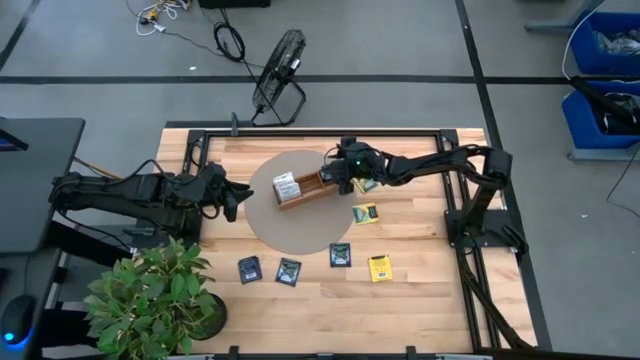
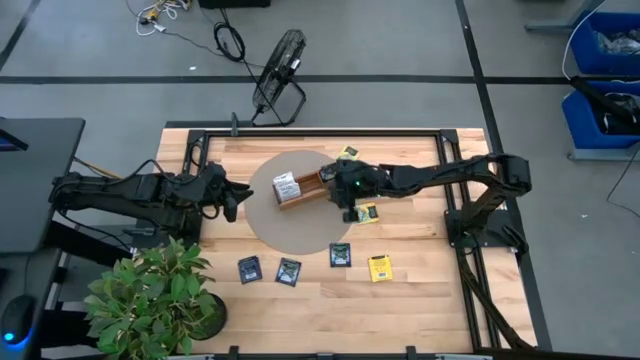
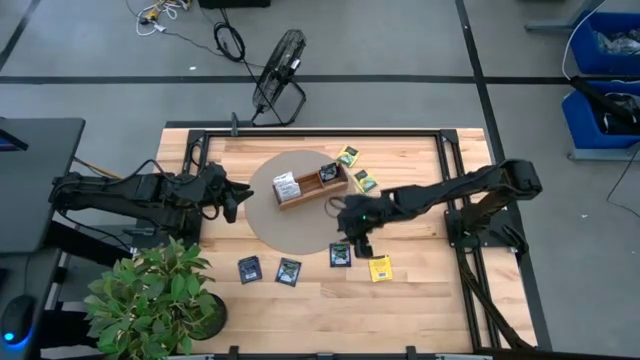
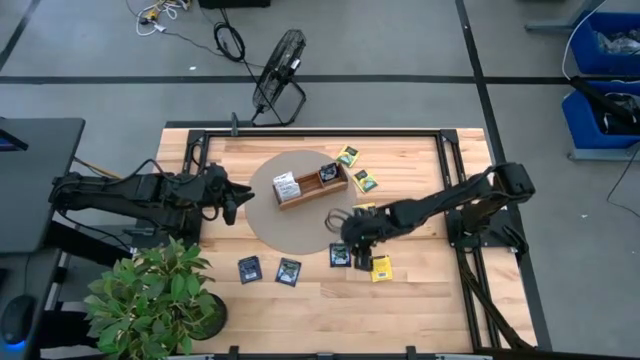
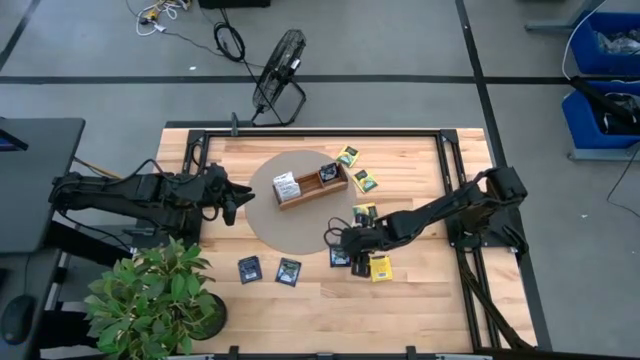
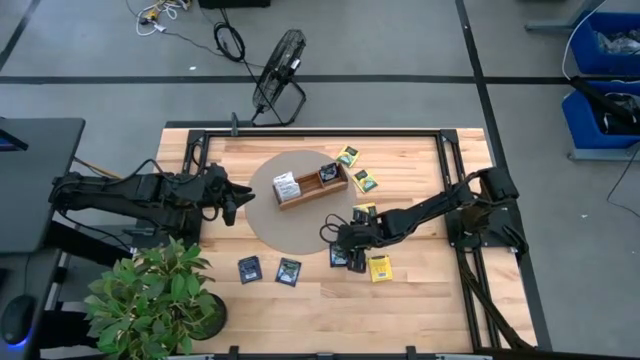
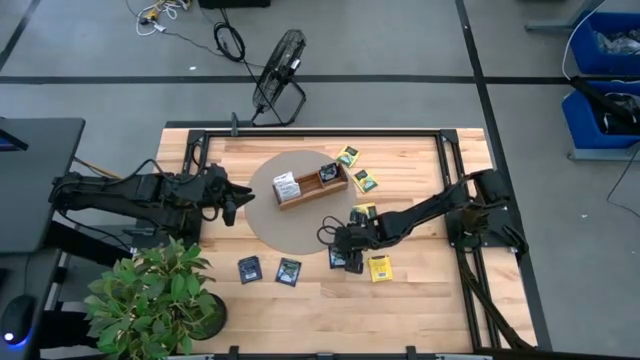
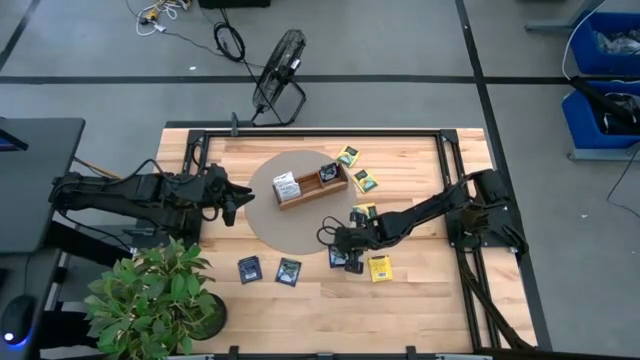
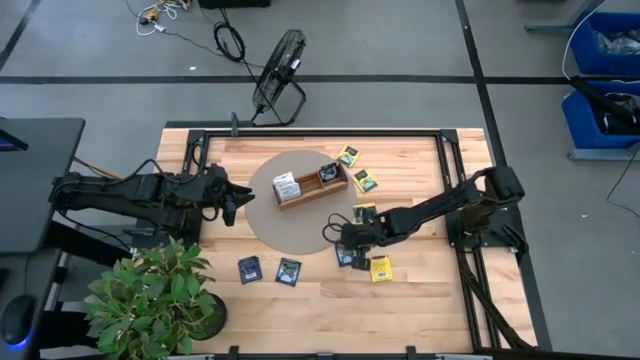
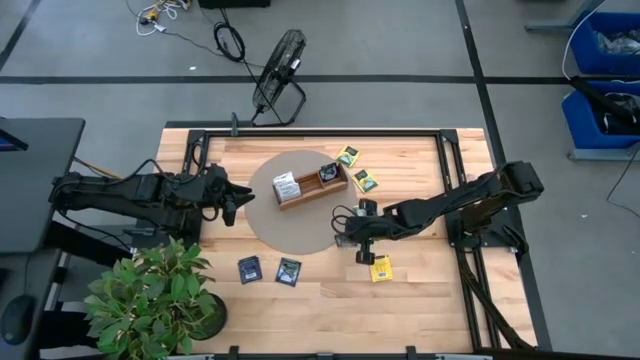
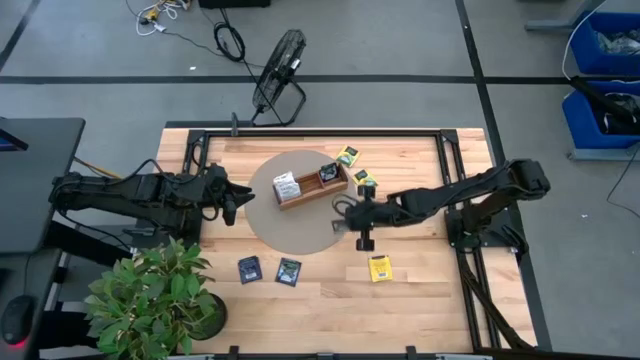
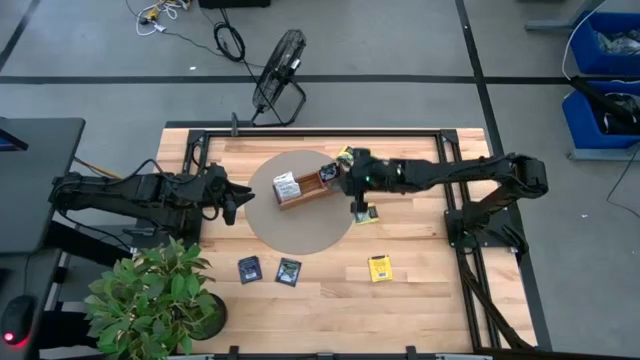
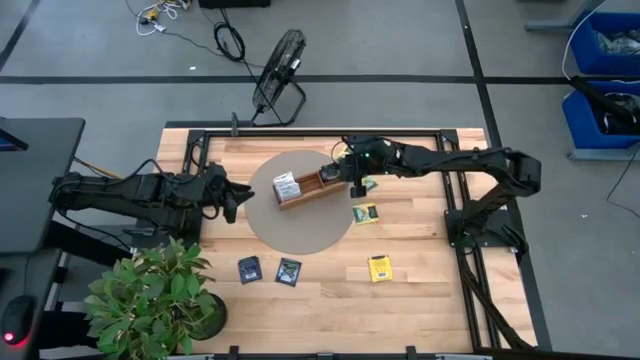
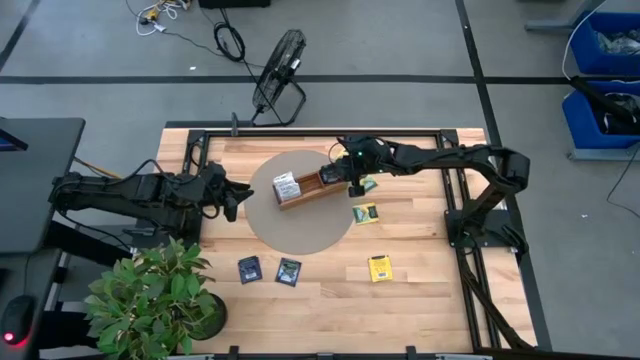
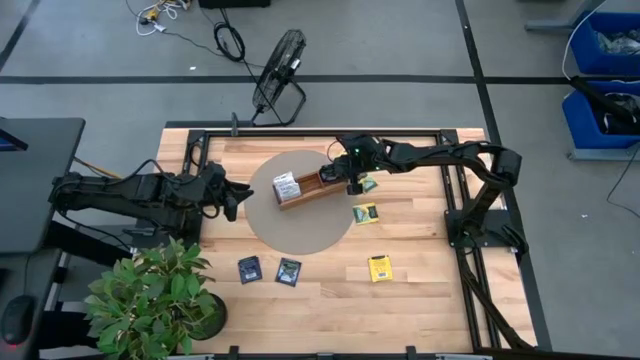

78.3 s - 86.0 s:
Task: Pick & Place Tea
Put the purple tea bag into the right section of the wooden organizer

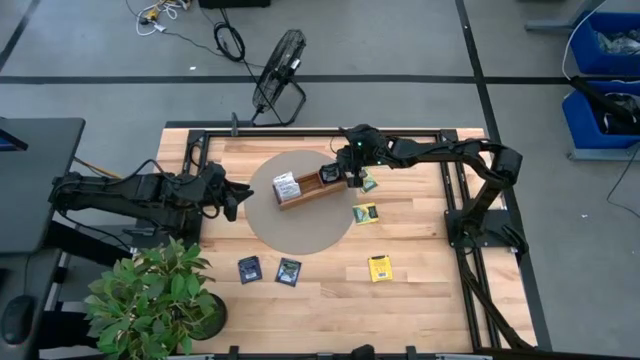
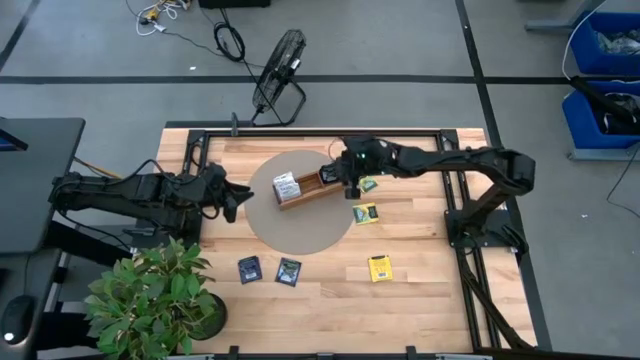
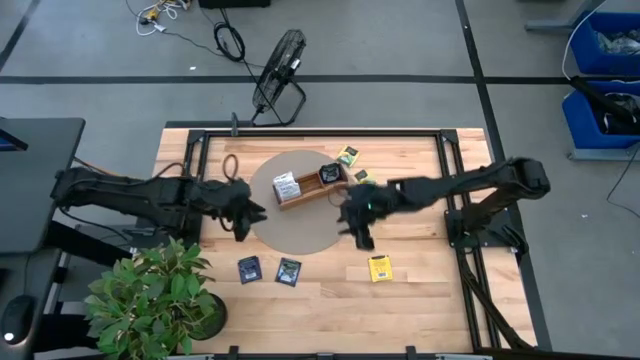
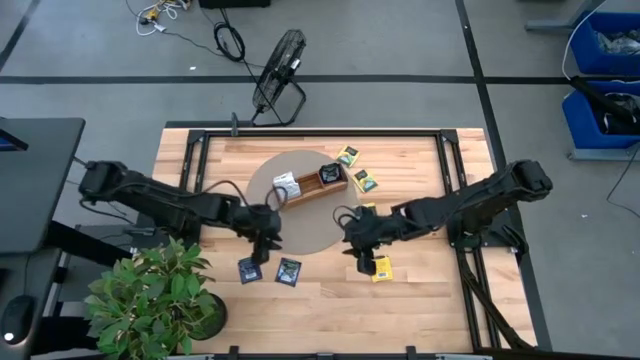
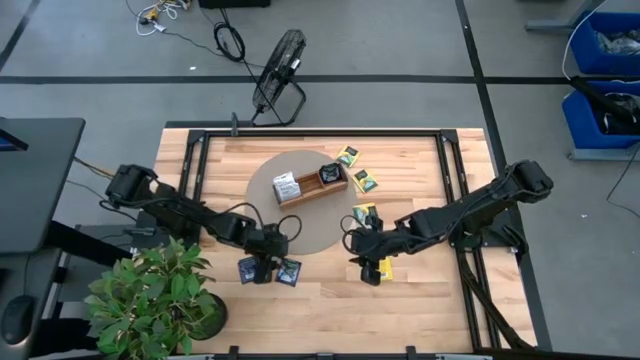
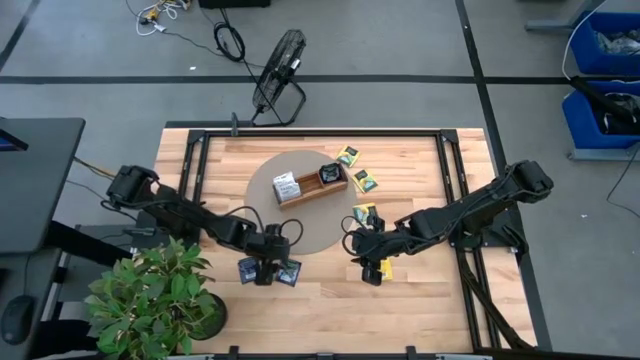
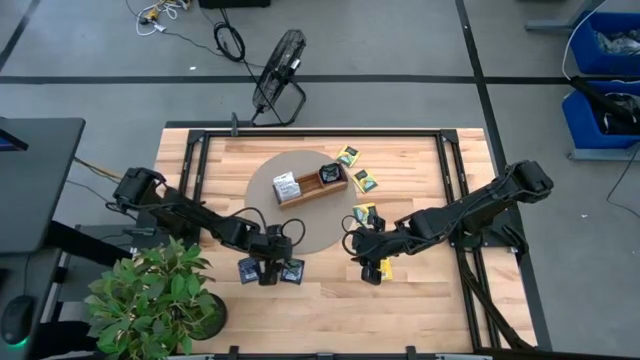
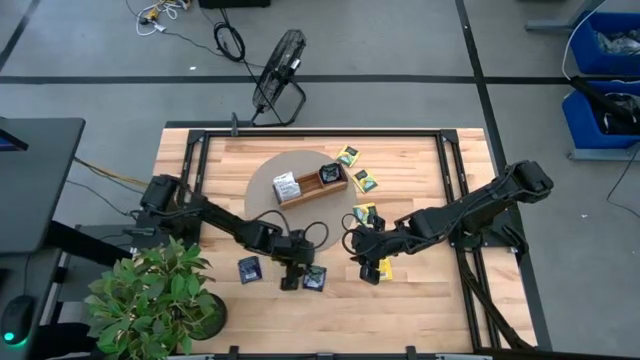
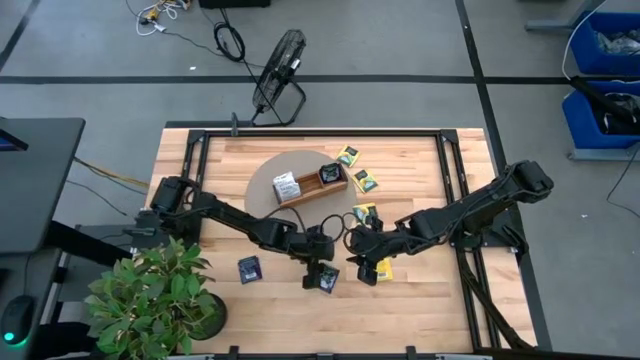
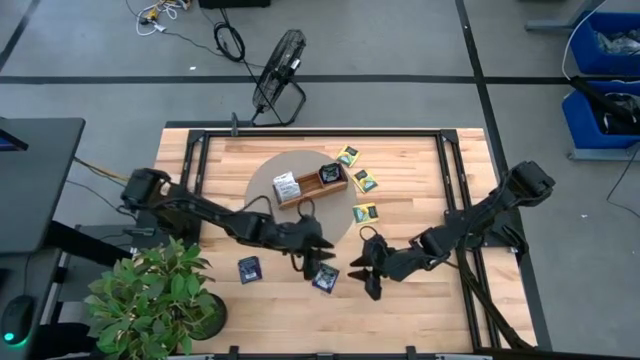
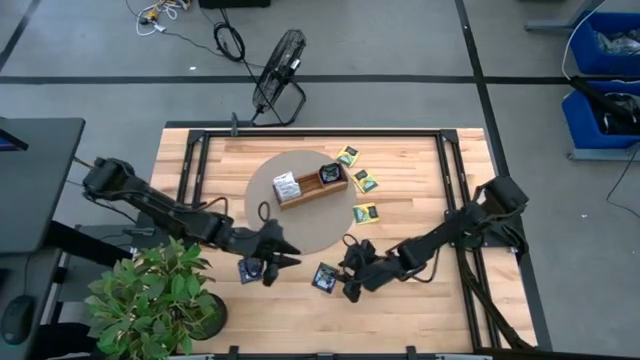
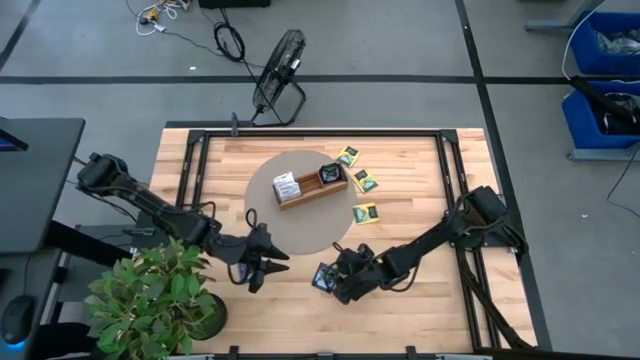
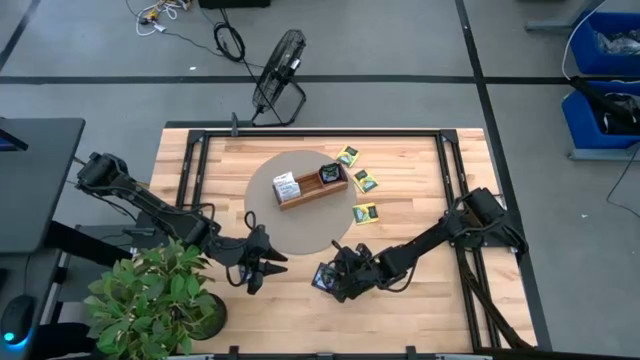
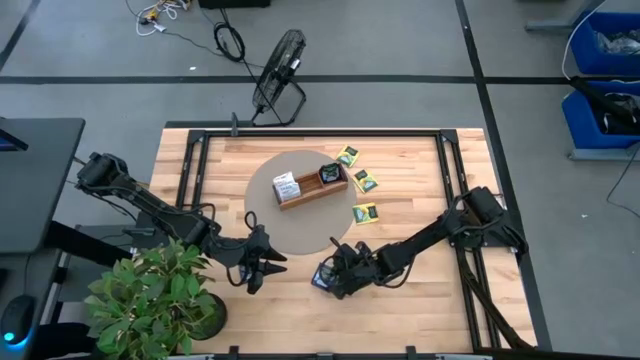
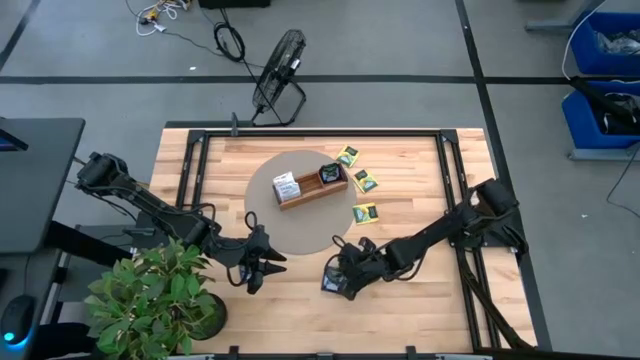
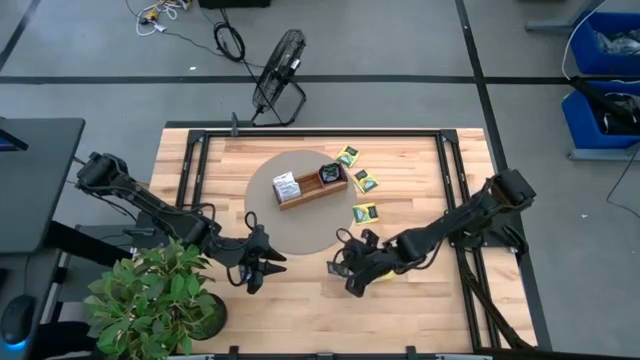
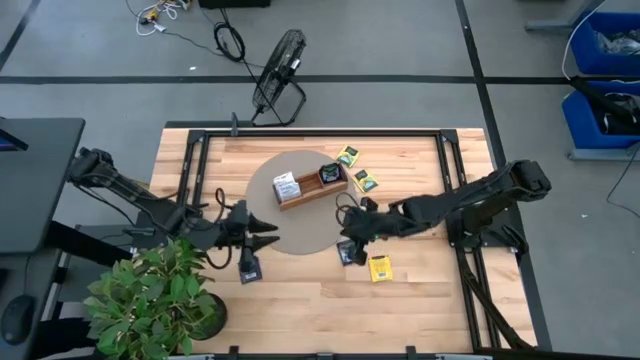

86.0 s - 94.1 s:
Put the purple tea bag into the right section of the wooden organizer

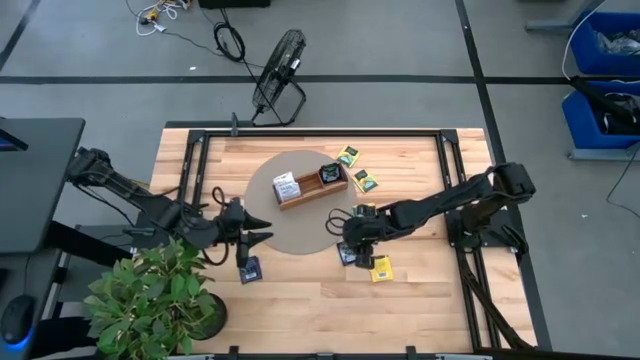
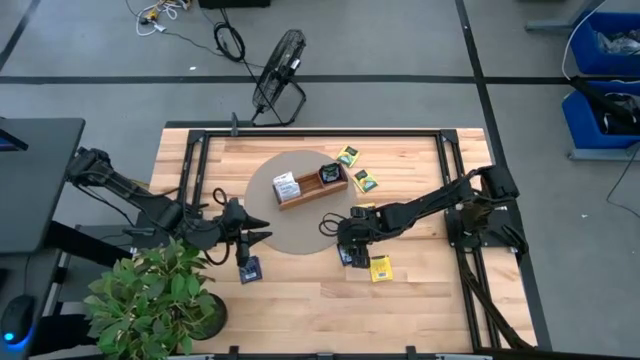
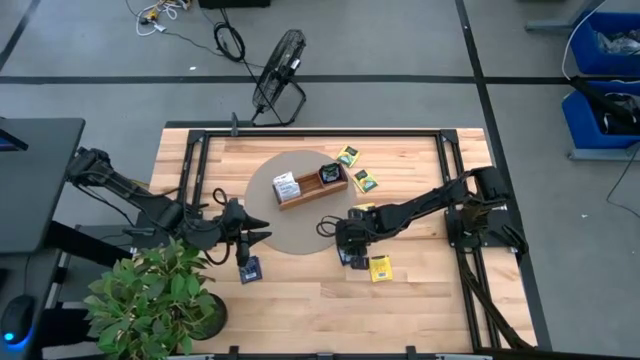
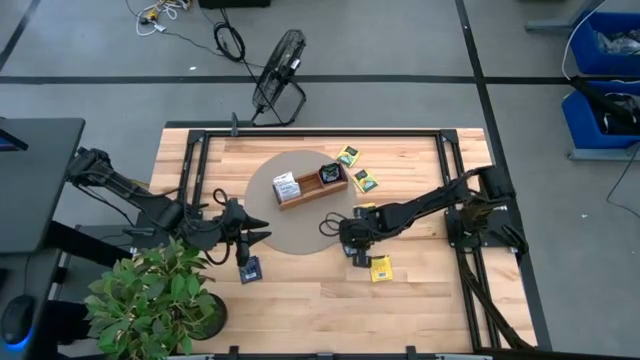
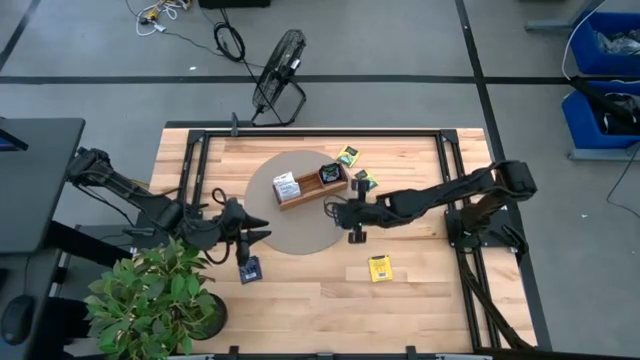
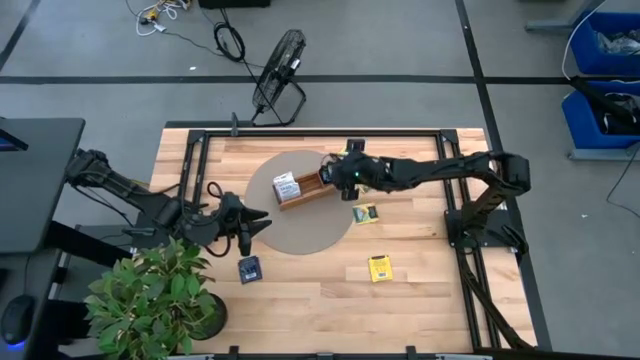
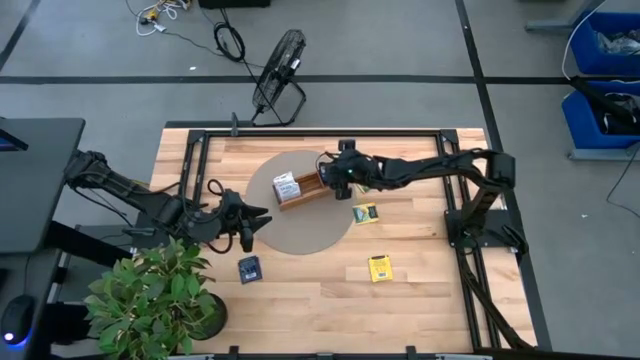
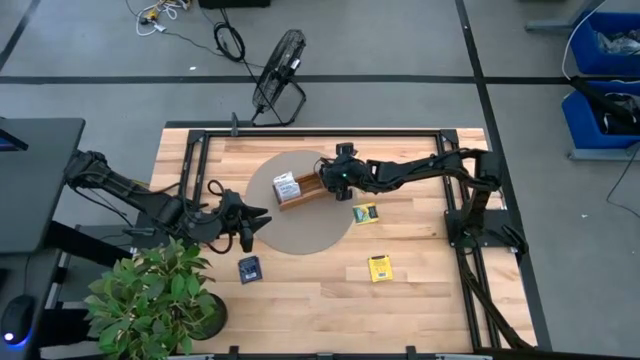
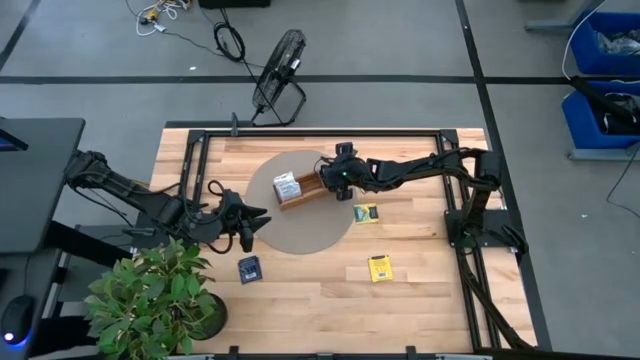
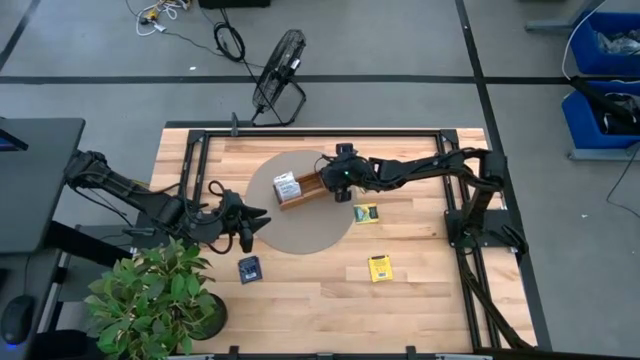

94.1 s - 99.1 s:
Put the purple tea bag into the right section of the wooden organizer

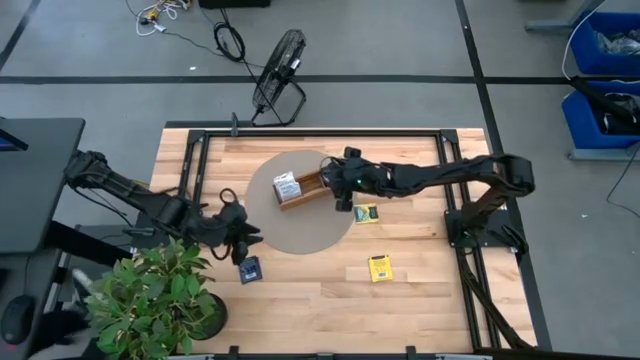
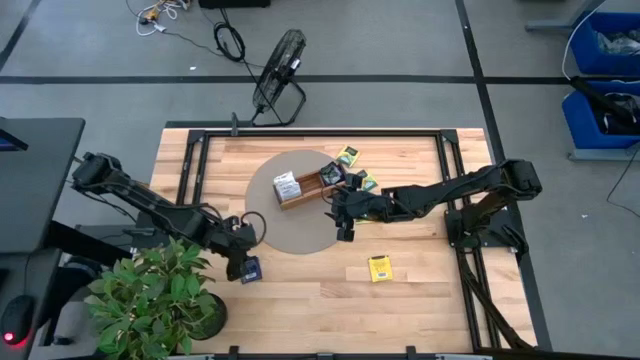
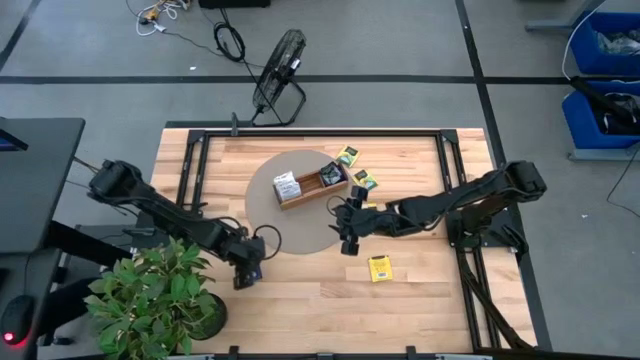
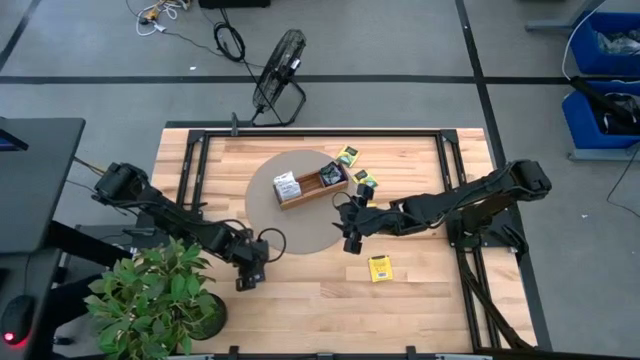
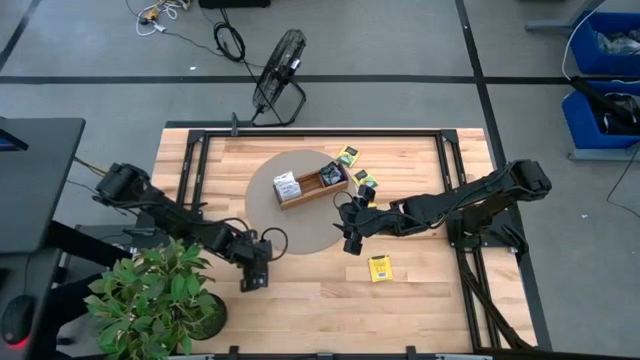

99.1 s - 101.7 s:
Put the purple tea bag into the right section of the wooden organizer
